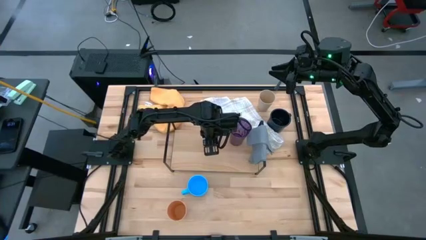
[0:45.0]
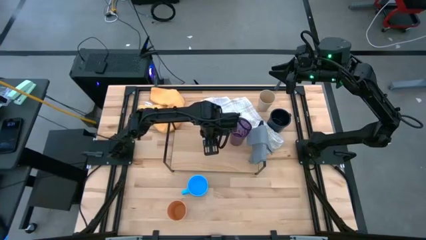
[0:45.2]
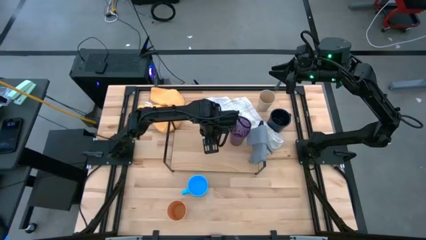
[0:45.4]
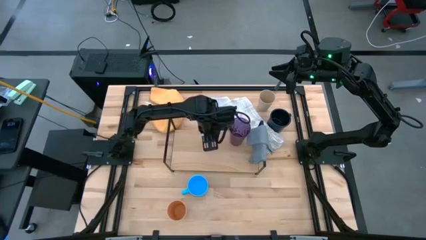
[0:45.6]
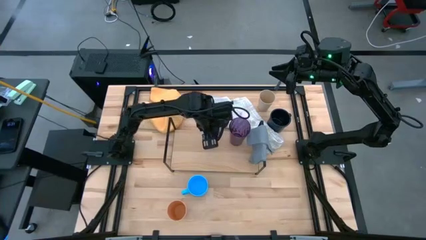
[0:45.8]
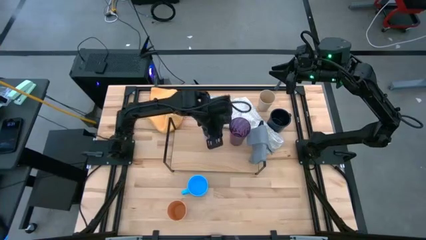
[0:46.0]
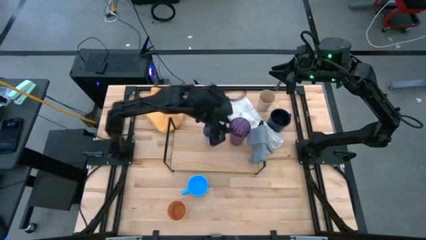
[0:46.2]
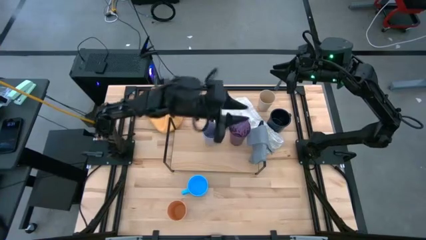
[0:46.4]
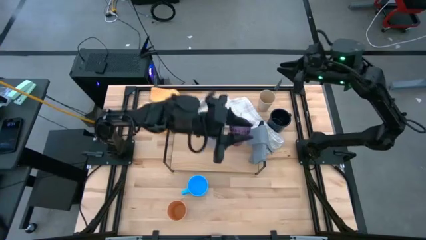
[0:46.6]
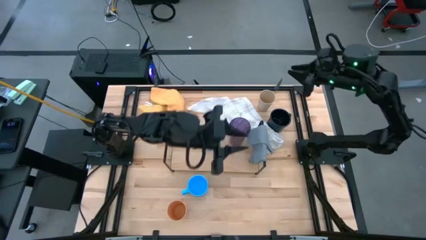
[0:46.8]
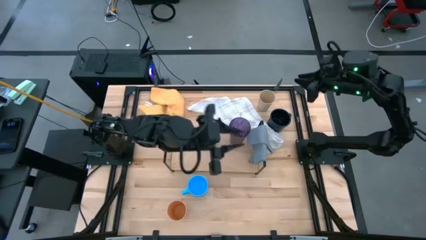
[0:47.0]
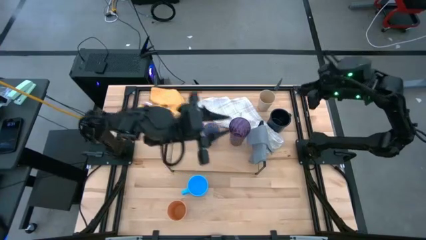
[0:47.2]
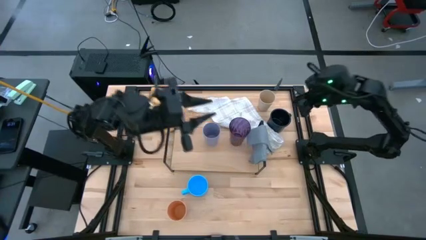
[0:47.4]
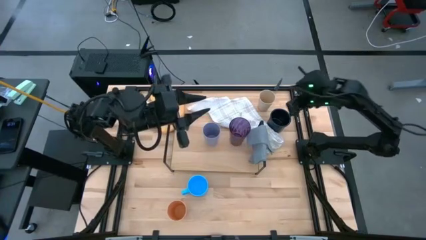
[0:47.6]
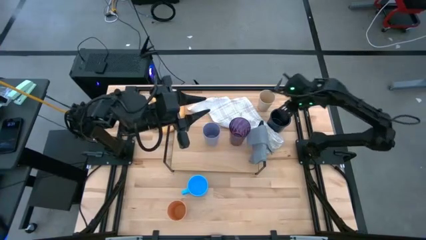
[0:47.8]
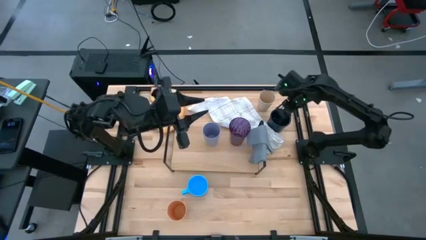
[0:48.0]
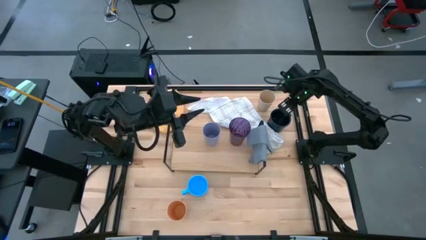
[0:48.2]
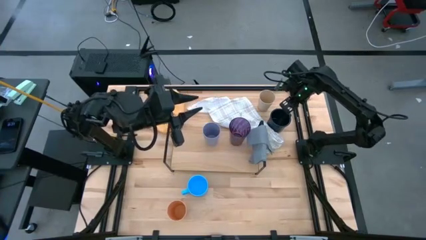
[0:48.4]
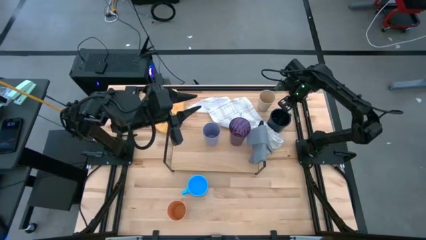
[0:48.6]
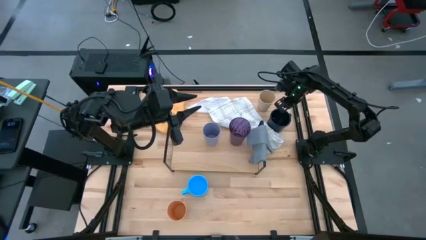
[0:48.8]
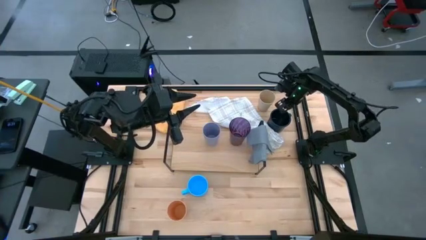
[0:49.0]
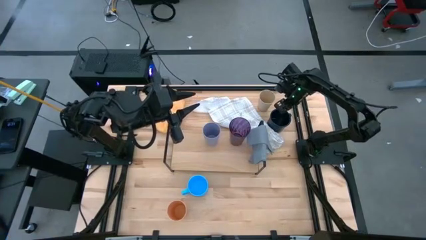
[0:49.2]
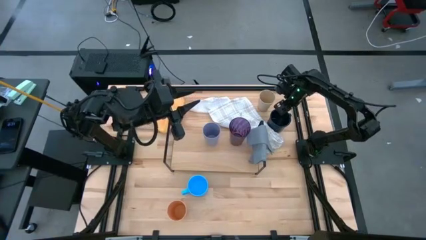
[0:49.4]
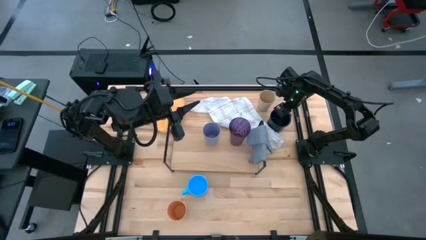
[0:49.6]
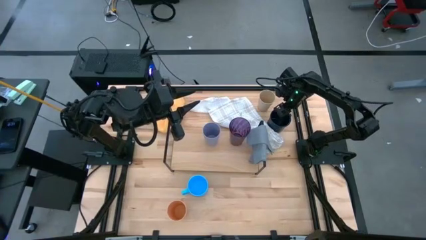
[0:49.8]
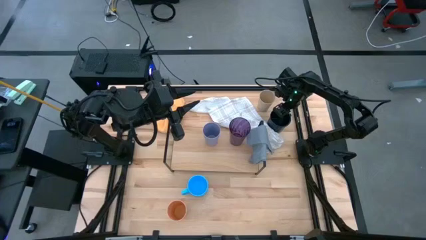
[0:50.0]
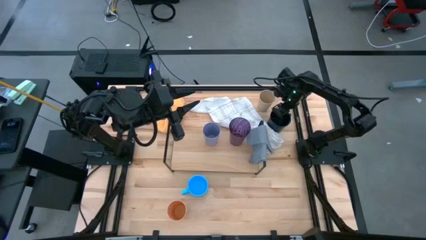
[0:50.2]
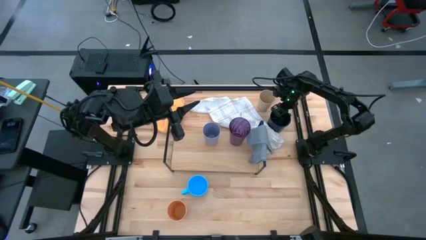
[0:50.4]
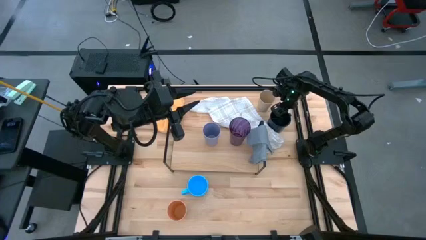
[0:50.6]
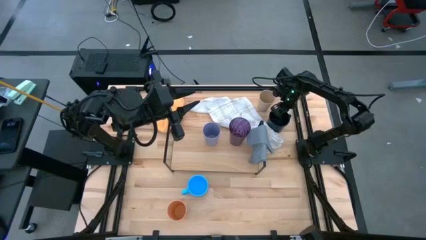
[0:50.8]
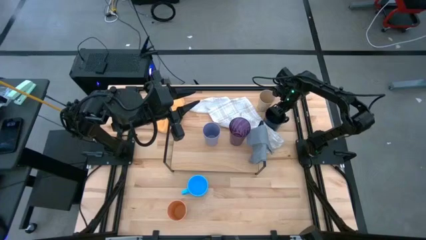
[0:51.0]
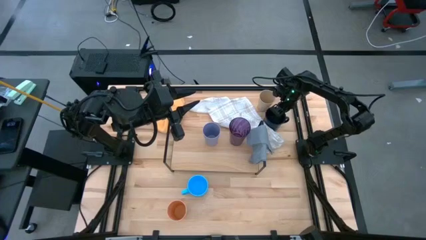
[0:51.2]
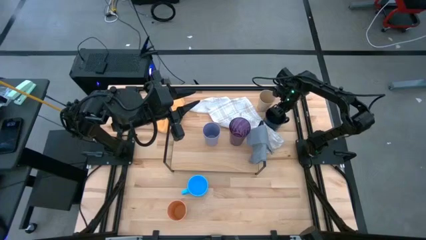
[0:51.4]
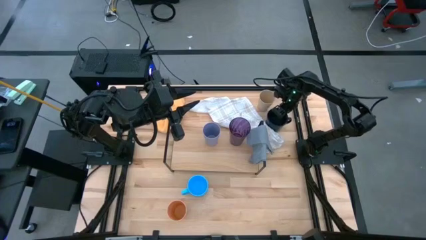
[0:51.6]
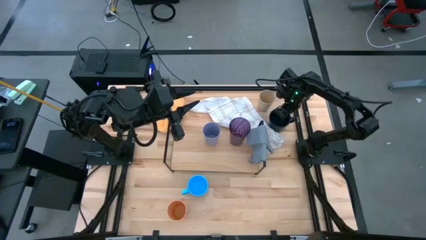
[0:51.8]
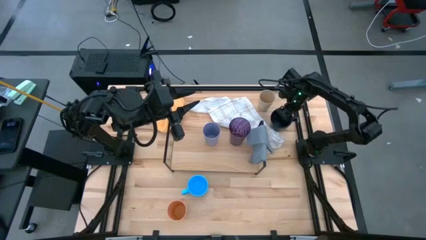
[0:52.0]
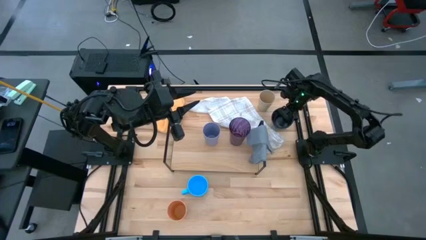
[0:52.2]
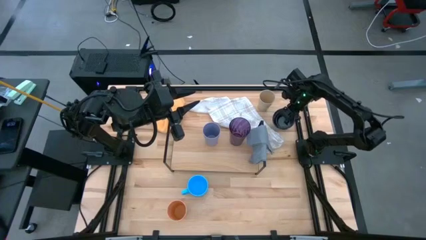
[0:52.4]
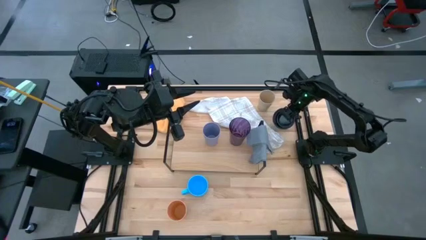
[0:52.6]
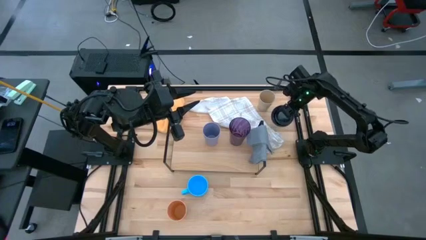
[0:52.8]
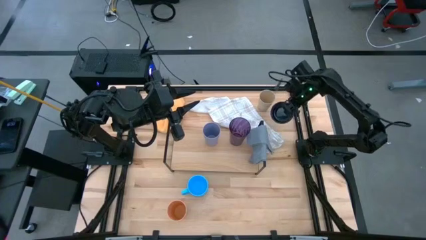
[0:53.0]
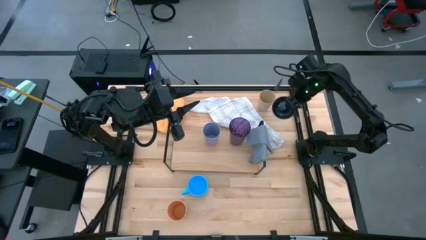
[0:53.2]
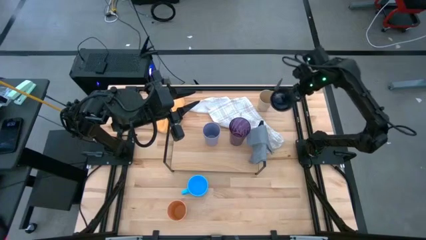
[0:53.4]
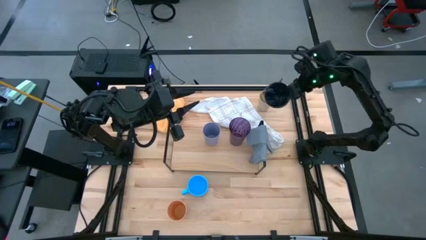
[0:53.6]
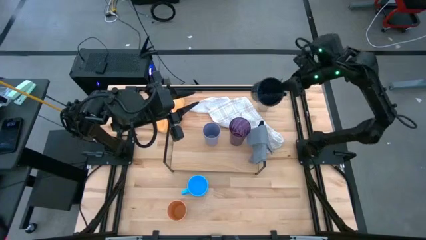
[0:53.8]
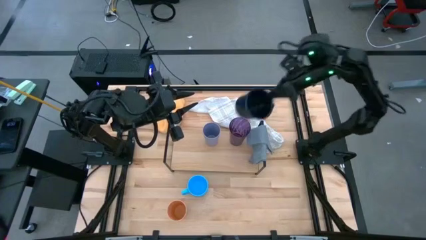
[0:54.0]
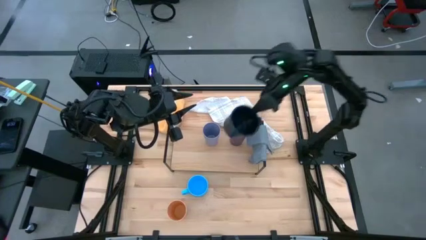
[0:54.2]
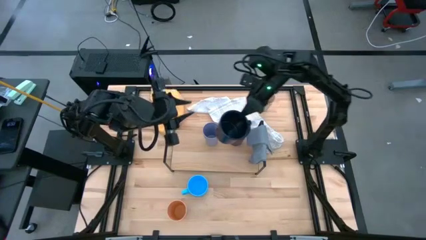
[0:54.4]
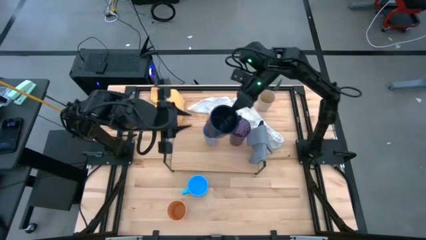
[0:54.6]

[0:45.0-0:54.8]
Task: Stack small to large cups/mugs on shelf
Put the black mug on the shelf

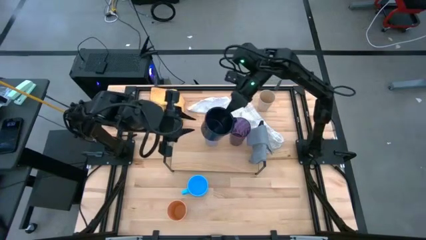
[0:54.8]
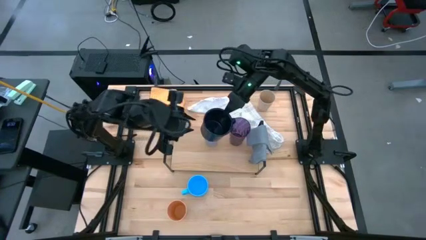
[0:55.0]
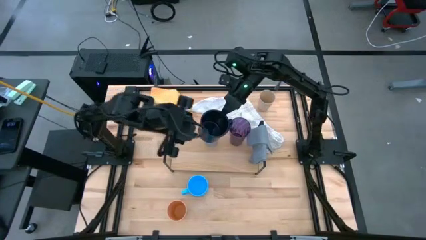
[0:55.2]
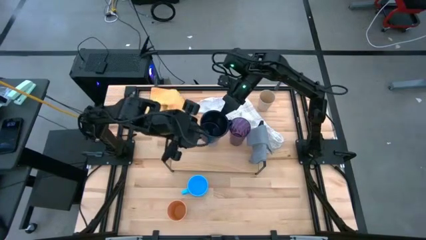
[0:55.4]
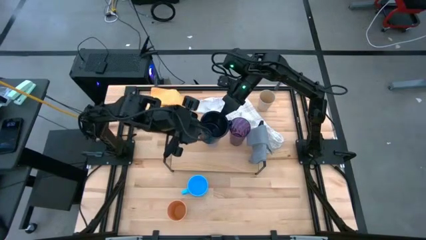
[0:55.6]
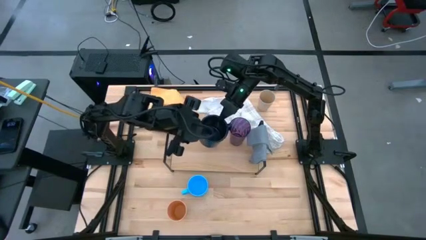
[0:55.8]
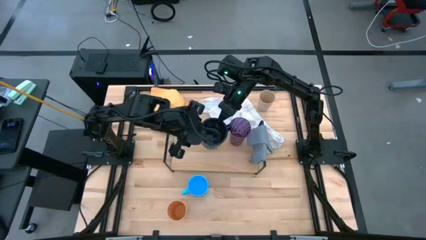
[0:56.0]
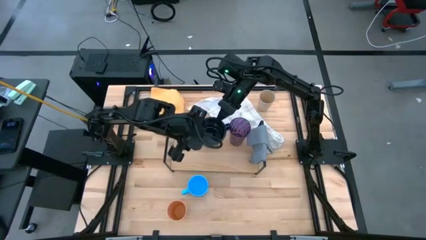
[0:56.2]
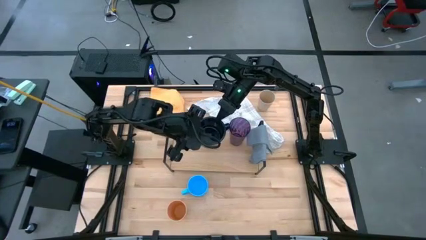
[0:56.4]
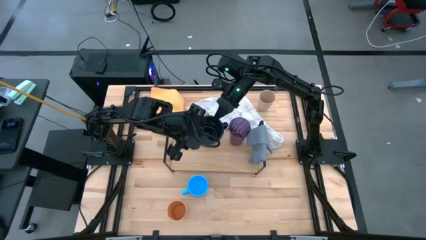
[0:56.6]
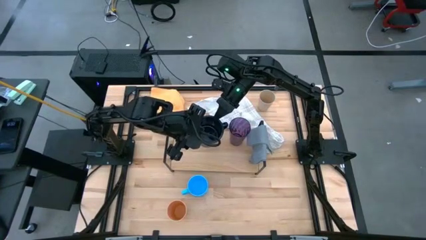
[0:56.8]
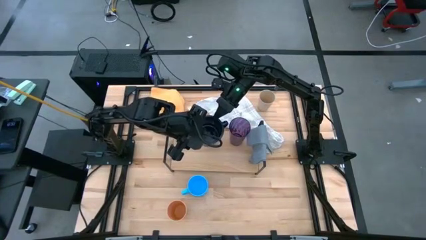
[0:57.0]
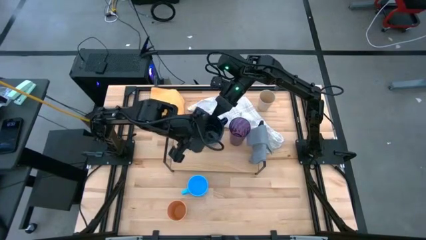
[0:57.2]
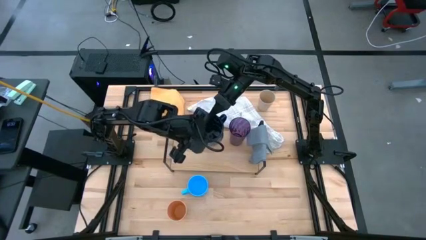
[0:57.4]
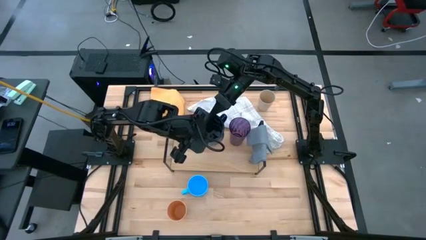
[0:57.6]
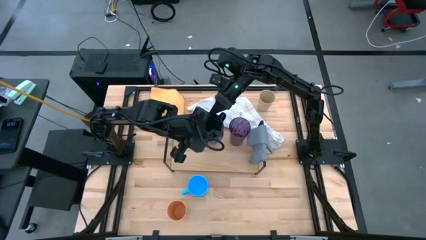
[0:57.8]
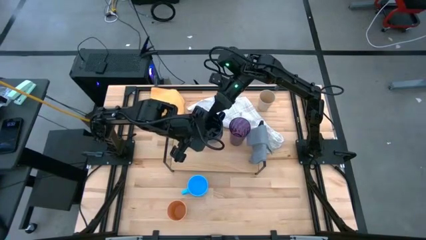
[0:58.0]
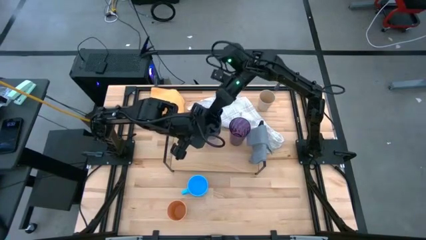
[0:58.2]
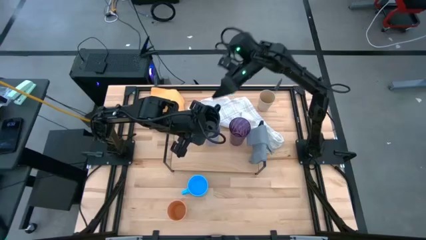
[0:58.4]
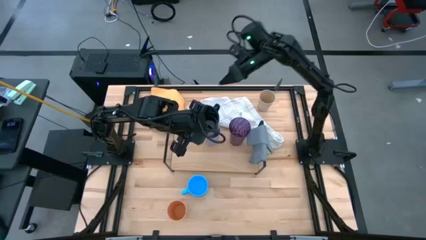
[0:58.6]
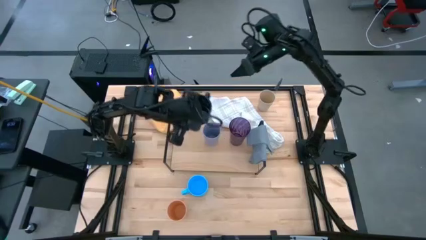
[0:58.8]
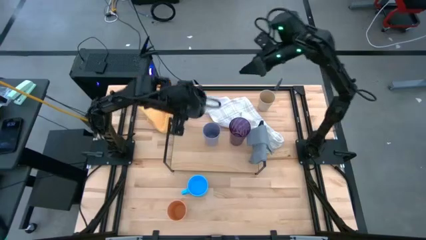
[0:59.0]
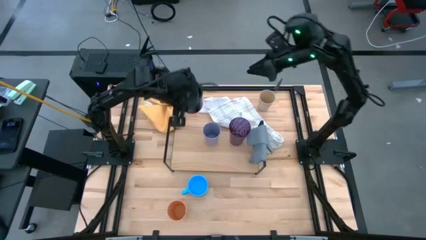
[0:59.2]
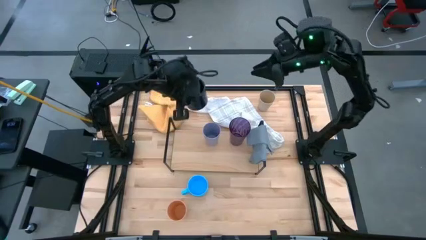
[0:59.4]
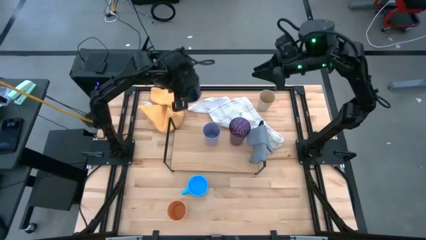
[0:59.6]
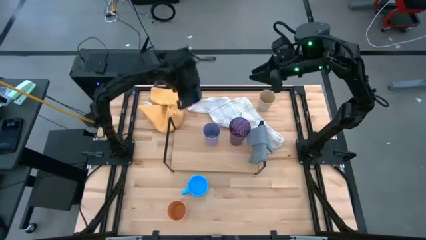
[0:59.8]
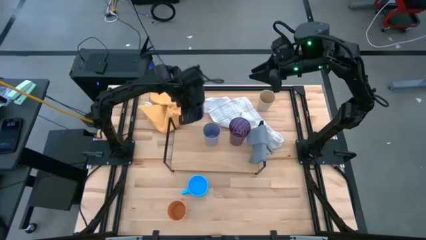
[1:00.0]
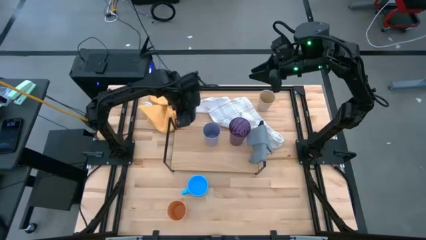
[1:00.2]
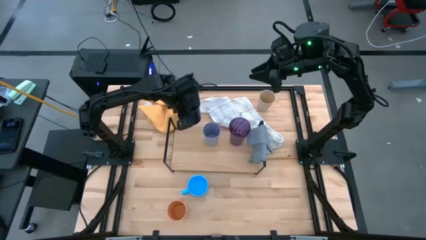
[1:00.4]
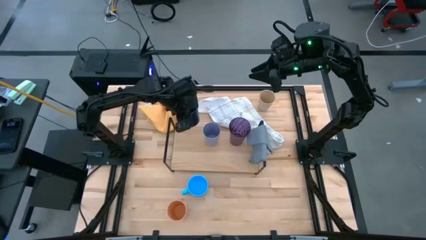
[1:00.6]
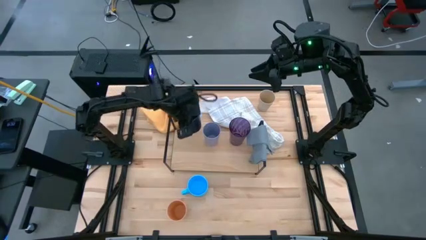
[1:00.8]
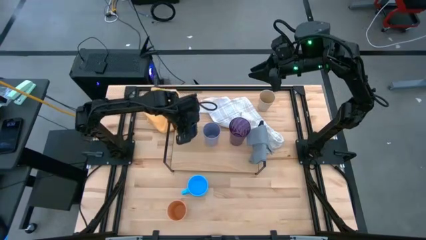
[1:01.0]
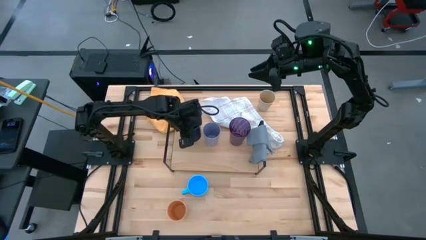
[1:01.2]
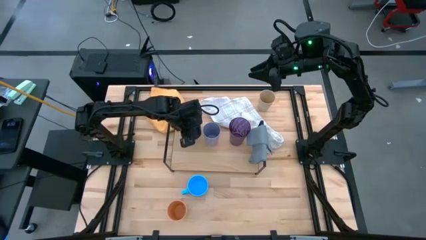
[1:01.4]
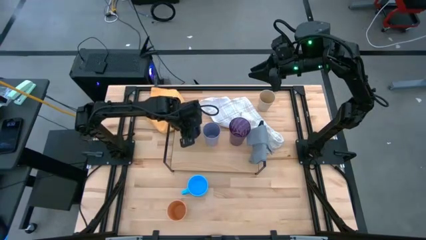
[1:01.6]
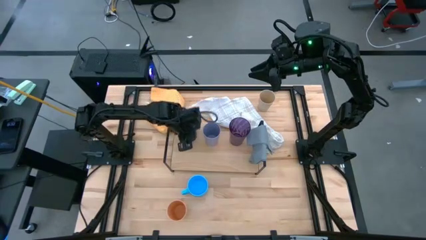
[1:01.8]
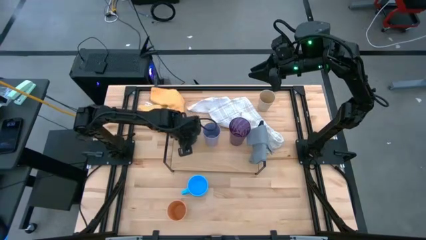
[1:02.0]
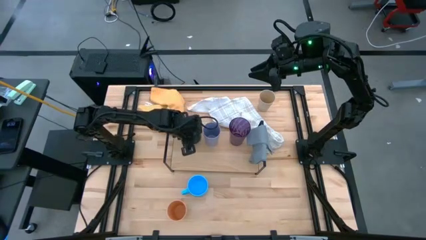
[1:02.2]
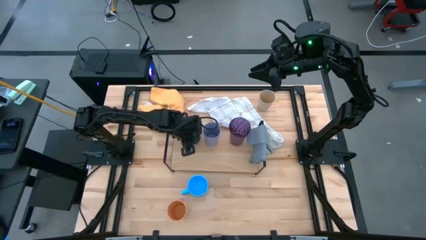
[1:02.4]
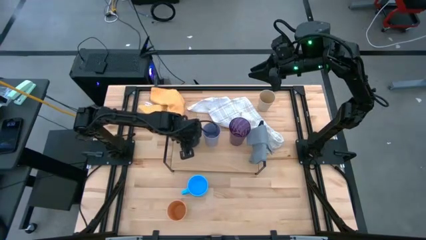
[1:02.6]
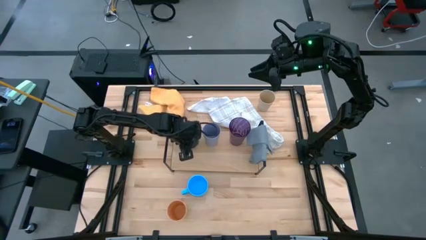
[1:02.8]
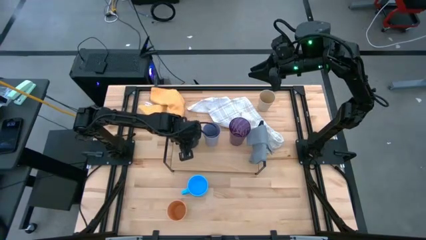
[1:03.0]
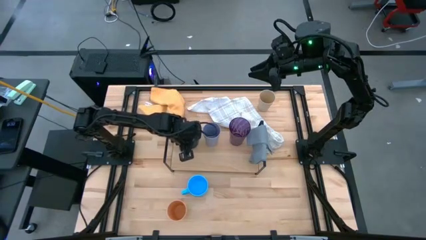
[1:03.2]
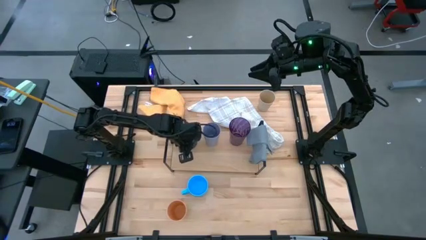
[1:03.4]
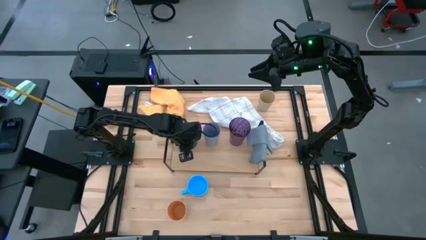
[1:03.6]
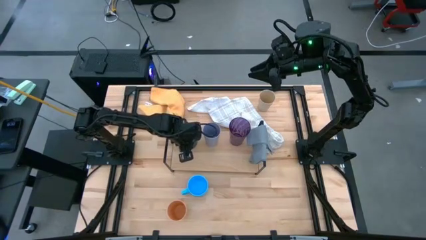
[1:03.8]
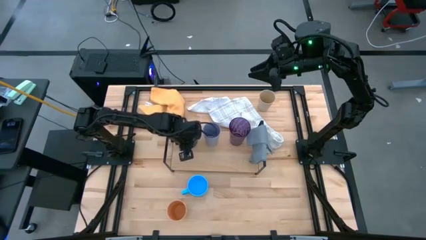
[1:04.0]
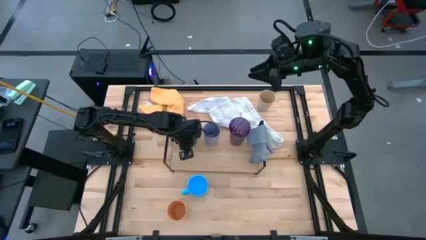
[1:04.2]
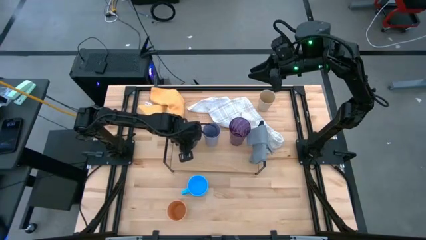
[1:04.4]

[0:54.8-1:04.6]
Put the black mug on the shelf
